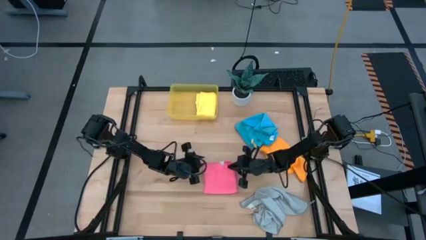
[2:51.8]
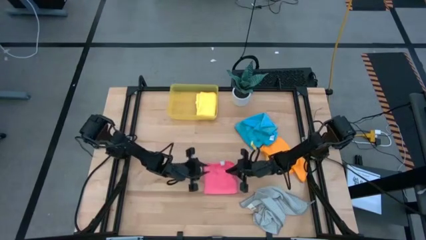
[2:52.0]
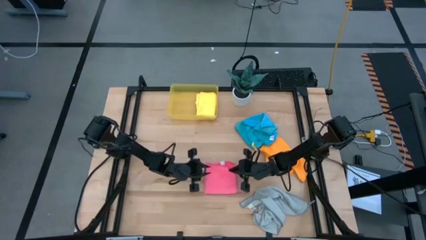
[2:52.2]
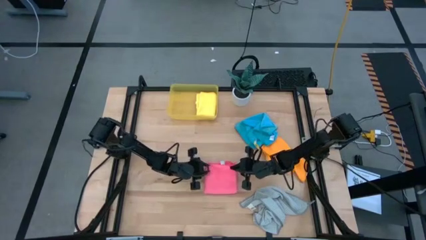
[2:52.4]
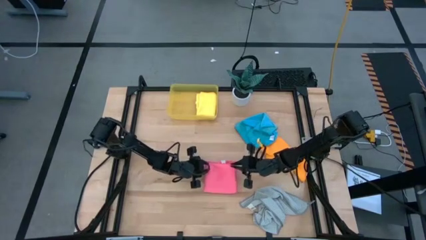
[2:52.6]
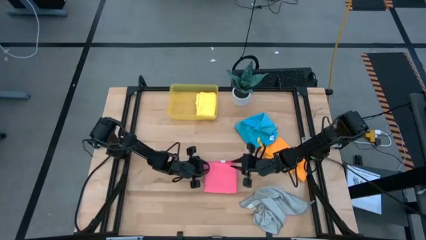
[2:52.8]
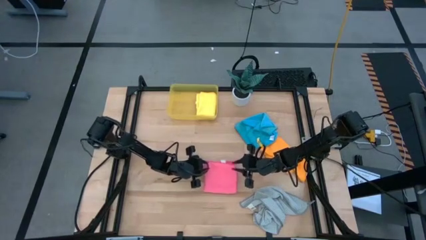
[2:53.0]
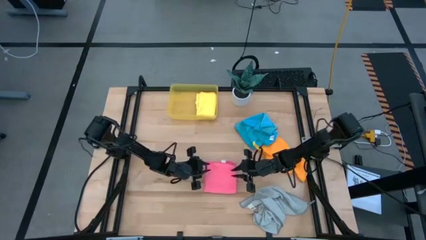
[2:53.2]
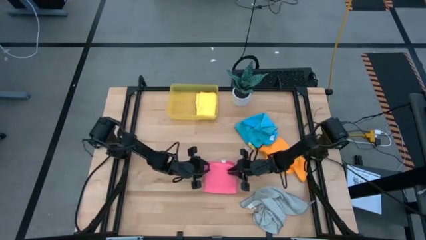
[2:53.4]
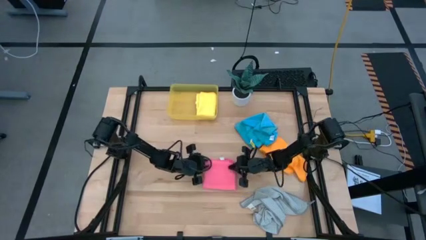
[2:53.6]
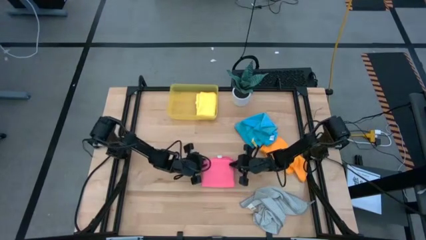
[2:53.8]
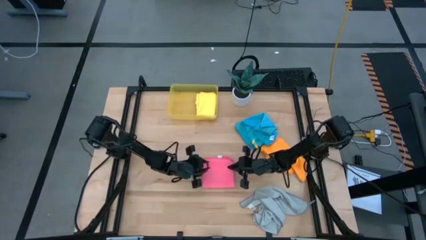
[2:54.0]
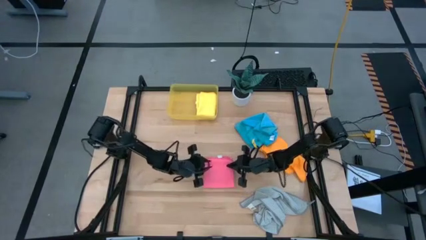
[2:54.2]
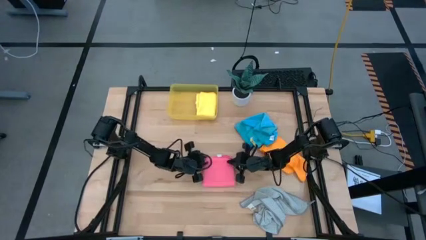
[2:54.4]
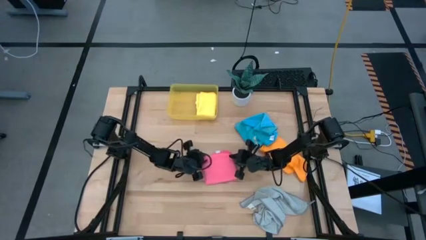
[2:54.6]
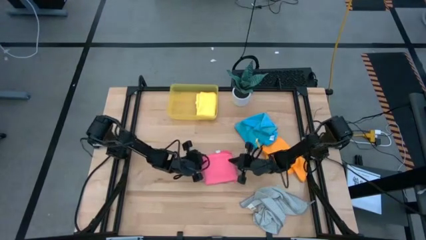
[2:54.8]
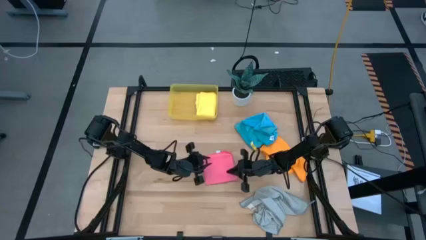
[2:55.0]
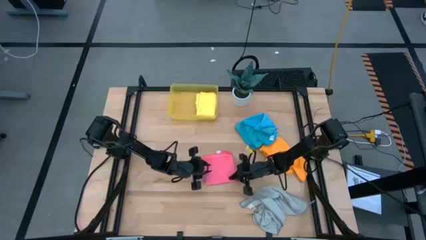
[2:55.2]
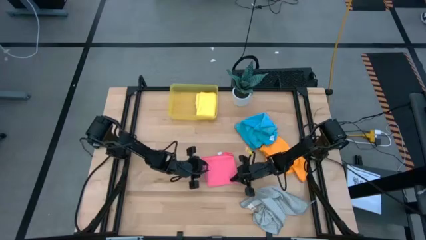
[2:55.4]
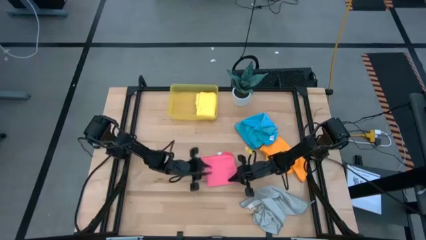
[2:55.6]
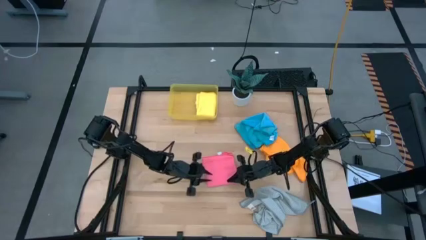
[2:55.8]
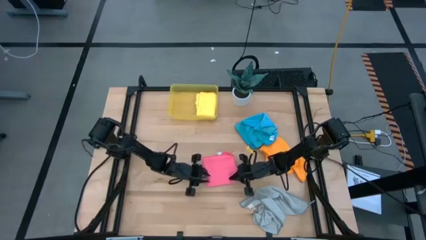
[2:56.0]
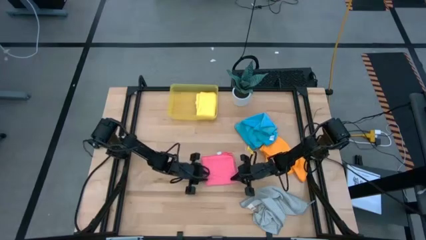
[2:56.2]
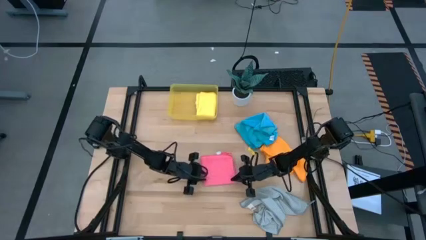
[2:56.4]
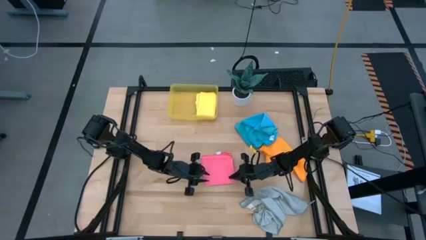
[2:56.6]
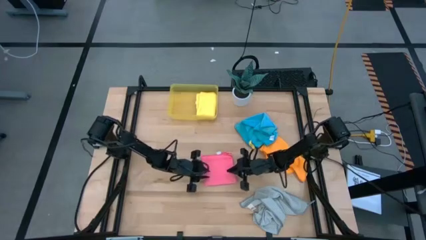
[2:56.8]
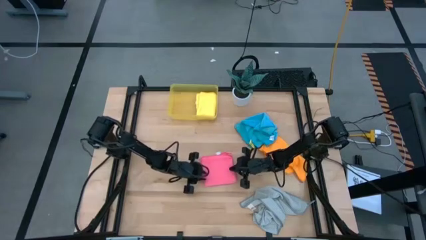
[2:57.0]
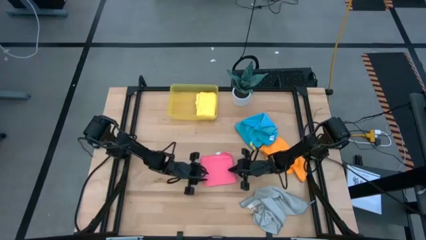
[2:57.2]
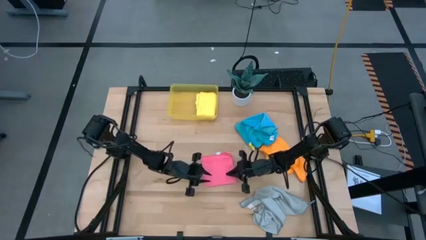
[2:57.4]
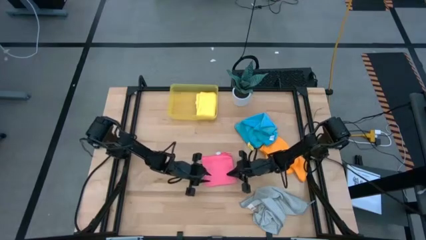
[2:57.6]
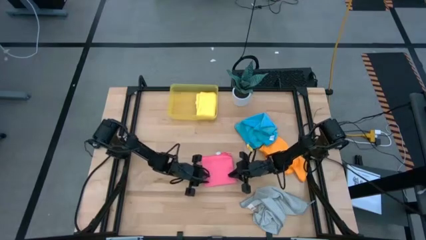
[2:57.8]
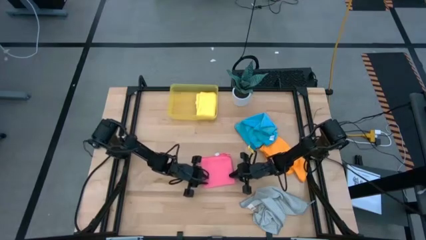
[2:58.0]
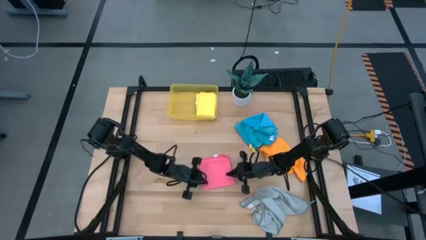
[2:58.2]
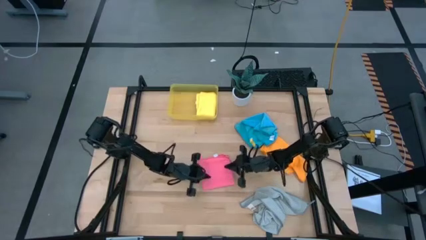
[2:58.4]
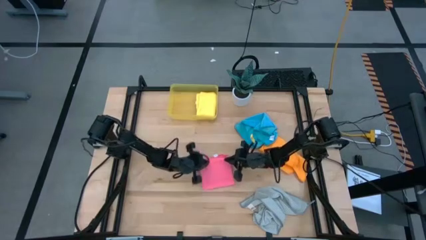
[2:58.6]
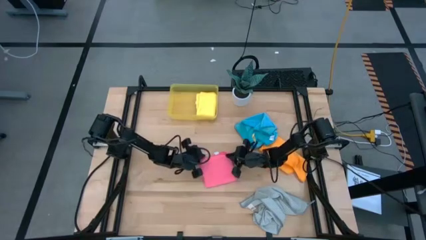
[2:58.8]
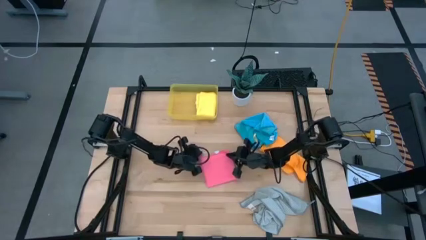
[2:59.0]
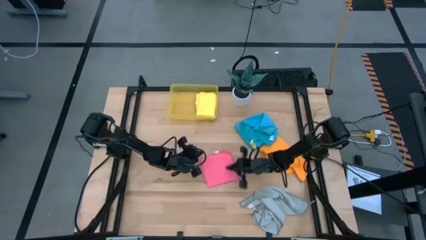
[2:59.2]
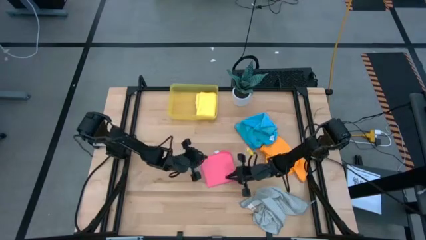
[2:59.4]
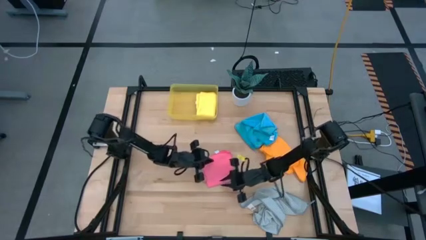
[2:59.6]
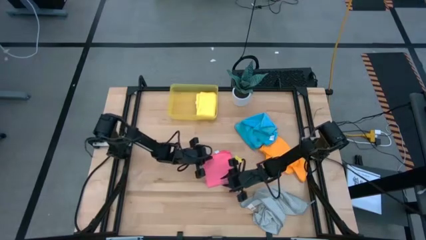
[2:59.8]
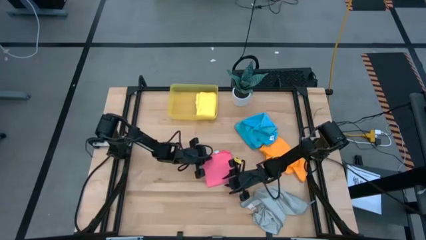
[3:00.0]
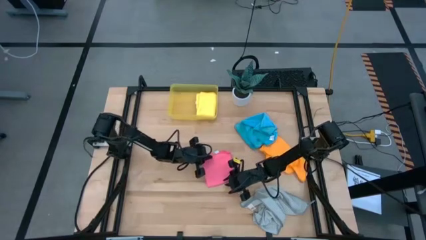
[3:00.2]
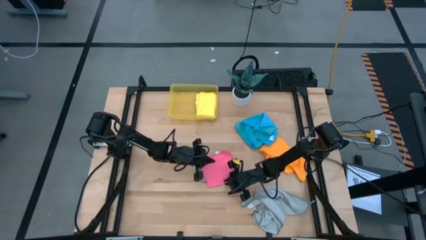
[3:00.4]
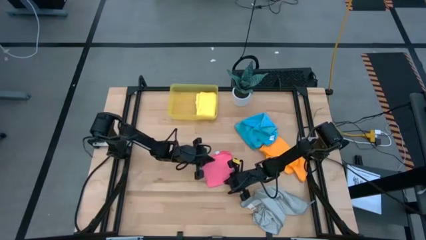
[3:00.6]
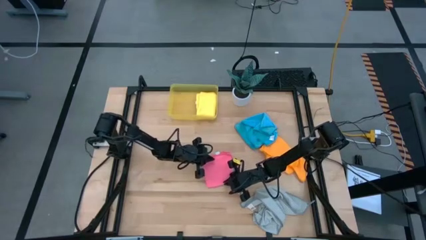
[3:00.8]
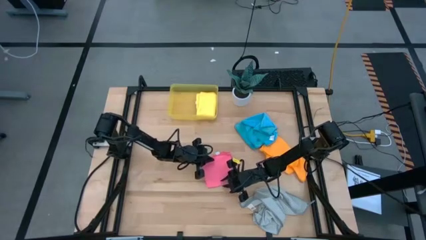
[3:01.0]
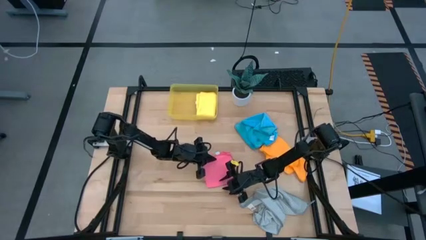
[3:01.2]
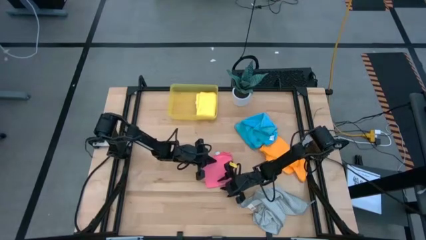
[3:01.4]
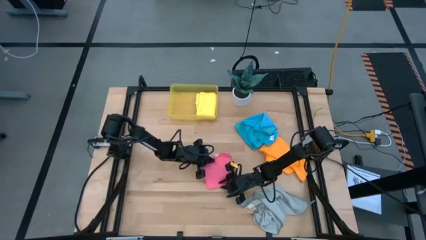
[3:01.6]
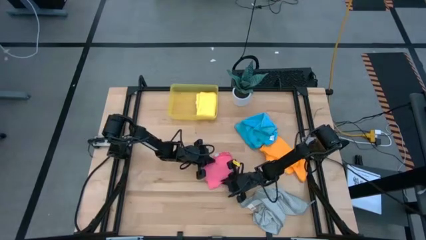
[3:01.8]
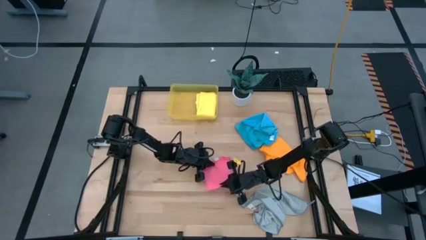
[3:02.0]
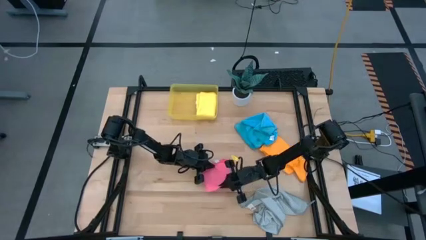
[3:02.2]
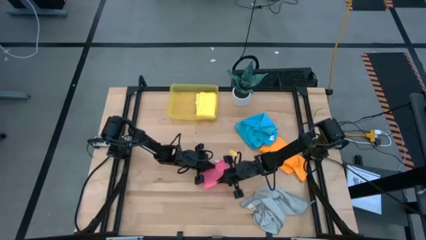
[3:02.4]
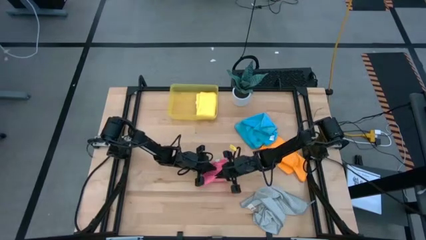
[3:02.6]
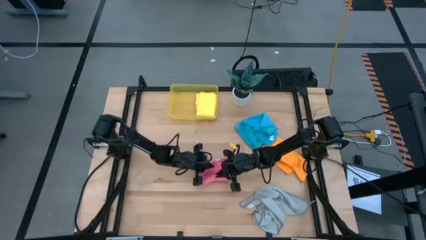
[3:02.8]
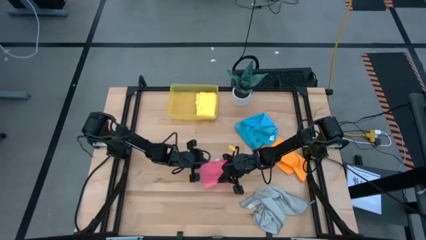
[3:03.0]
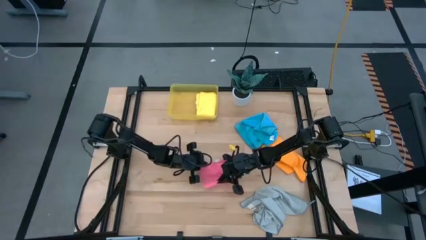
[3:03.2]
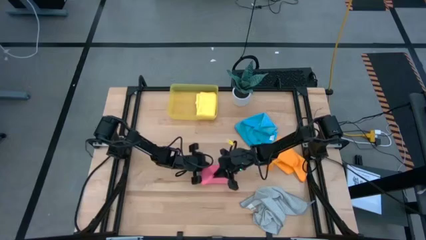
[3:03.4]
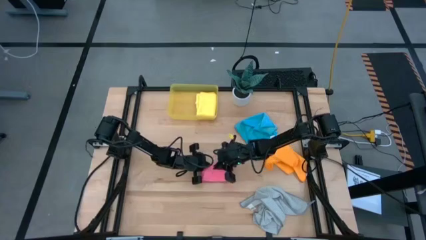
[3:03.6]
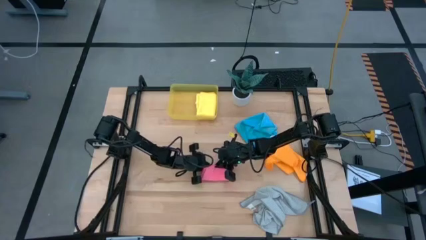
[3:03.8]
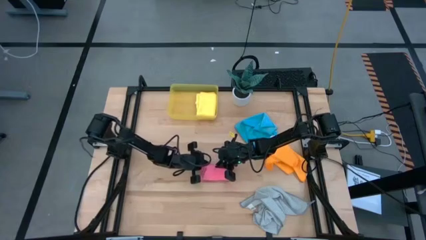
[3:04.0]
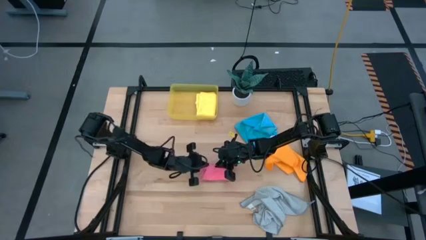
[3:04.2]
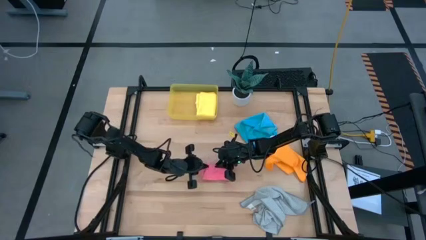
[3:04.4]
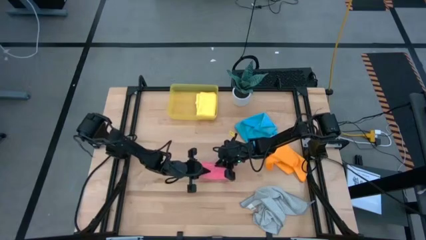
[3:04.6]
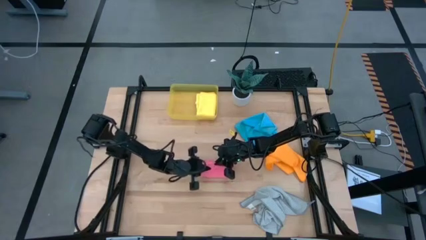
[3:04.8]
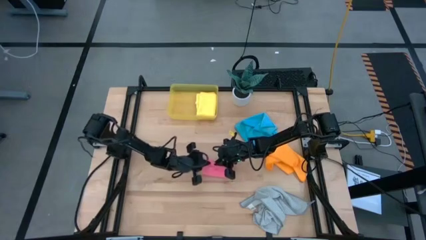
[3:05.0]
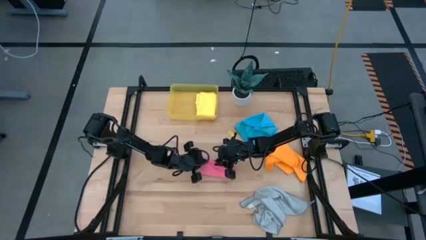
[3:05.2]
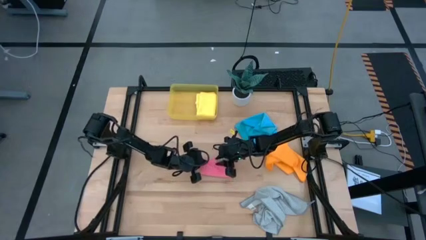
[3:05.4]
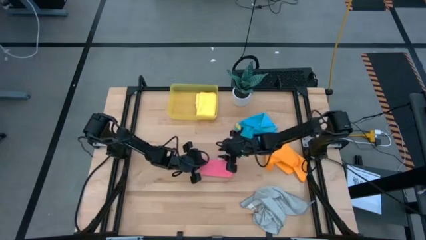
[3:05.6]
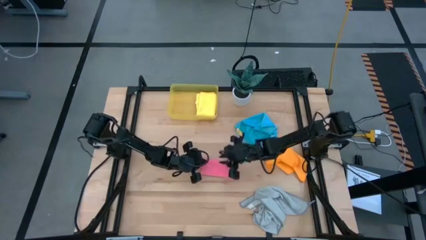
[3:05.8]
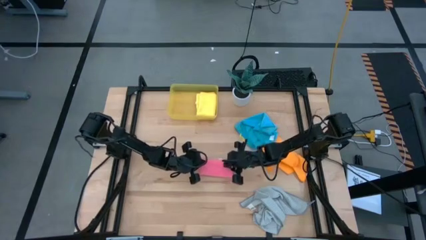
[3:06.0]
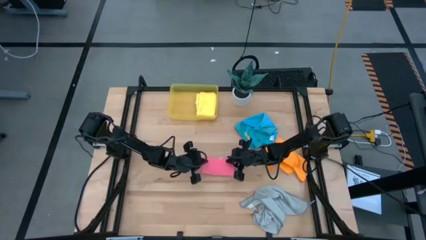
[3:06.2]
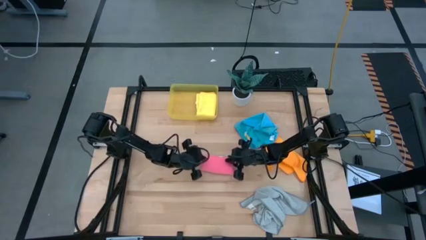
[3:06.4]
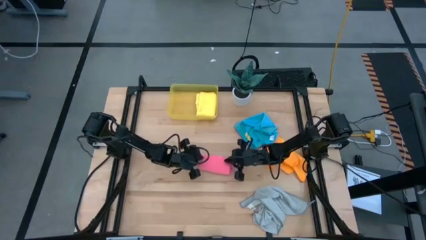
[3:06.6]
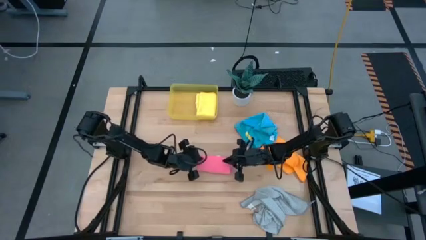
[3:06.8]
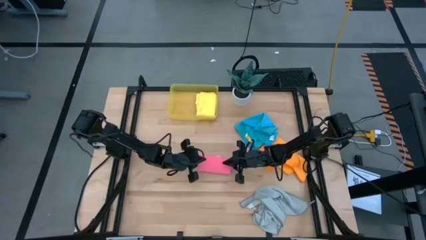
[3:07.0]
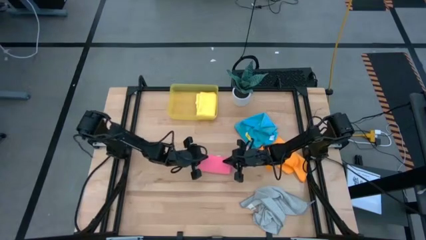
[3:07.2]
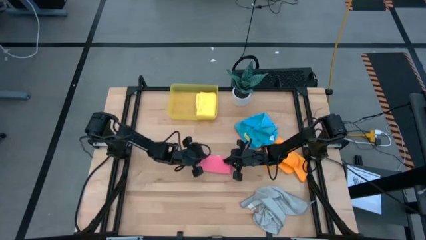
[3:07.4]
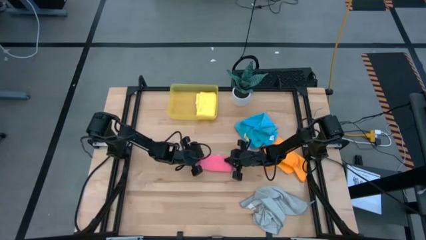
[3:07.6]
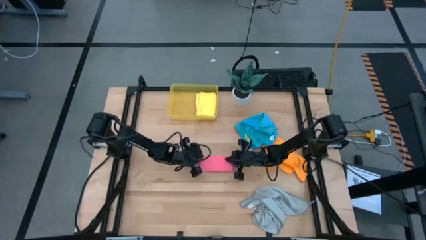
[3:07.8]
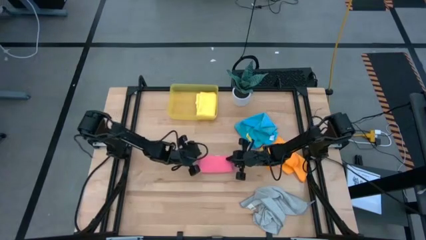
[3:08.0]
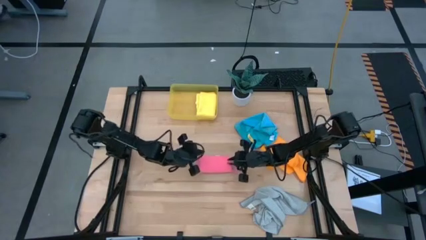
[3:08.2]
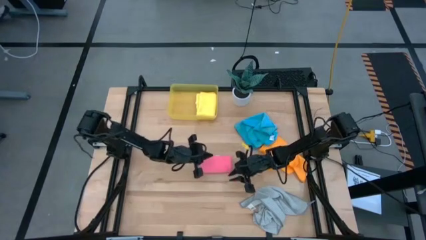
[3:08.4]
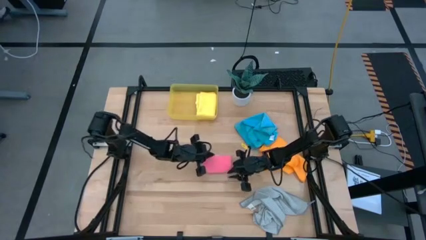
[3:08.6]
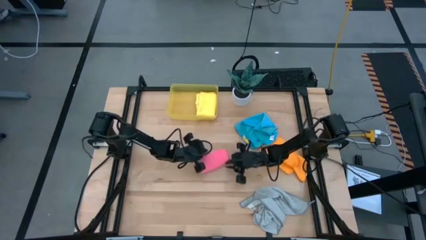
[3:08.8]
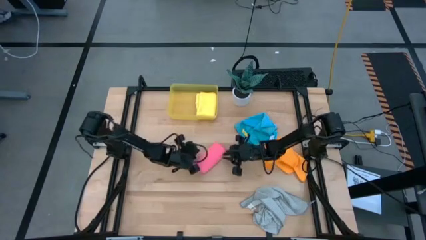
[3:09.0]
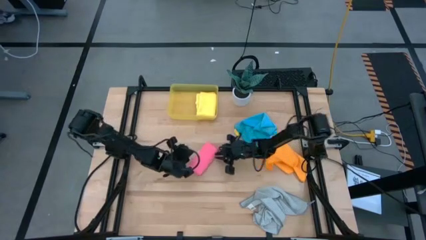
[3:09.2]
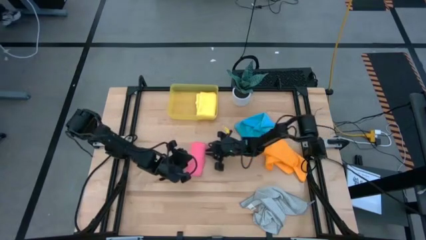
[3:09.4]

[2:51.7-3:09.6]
Task: Fold microfiber towels
Fold the pink microfiber cloth
